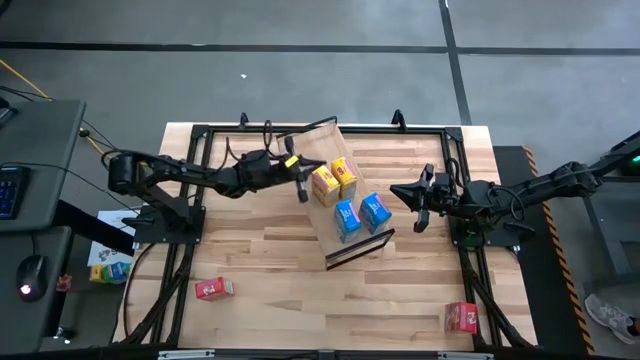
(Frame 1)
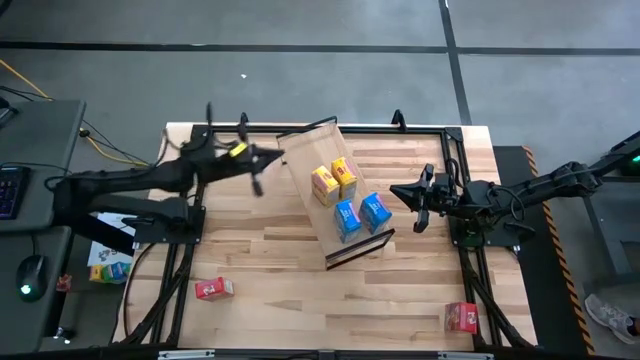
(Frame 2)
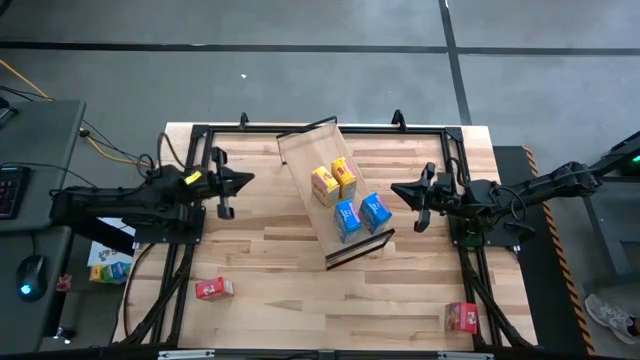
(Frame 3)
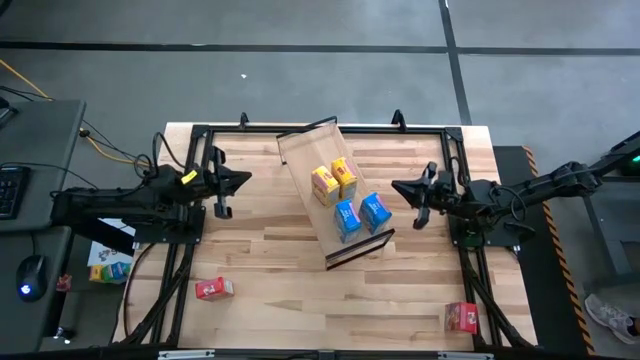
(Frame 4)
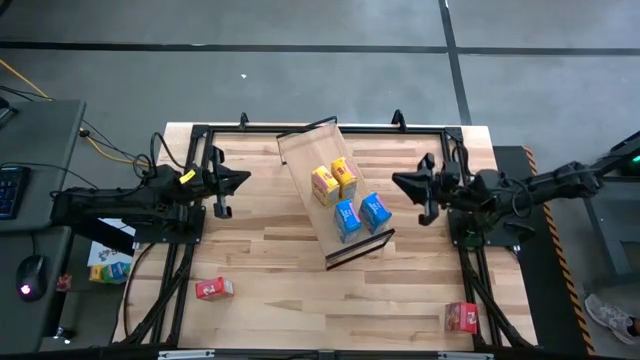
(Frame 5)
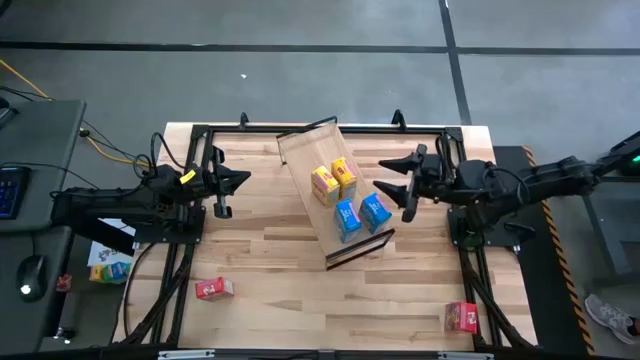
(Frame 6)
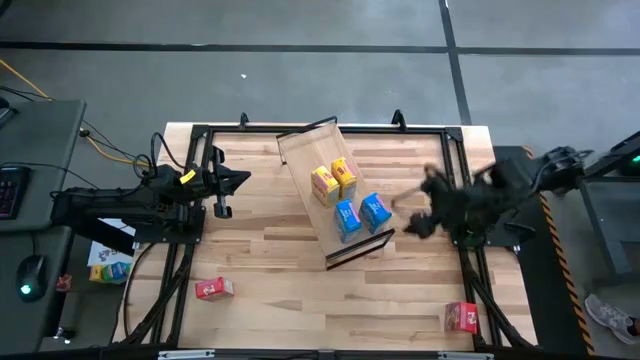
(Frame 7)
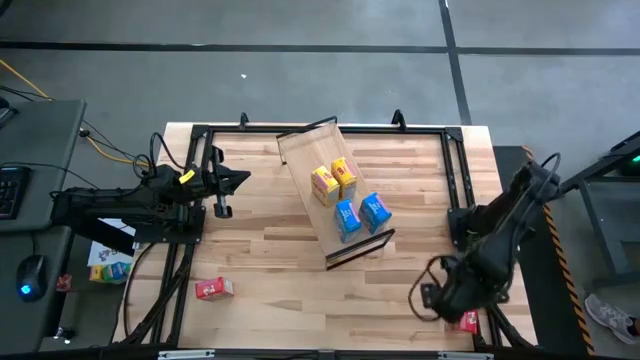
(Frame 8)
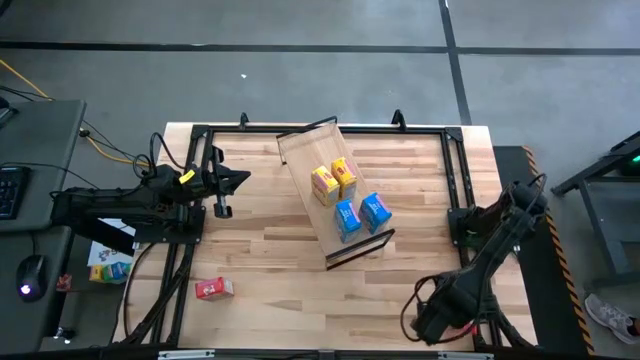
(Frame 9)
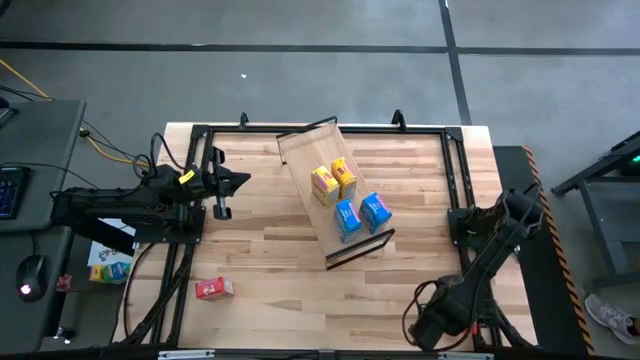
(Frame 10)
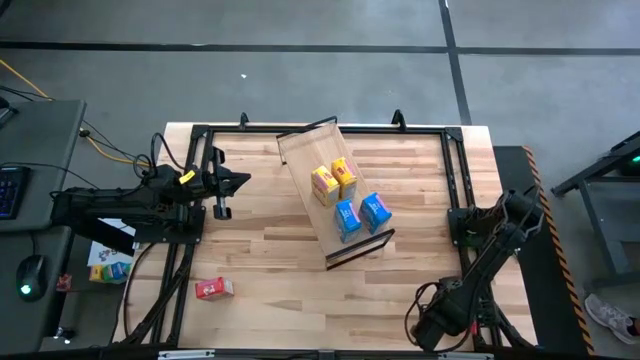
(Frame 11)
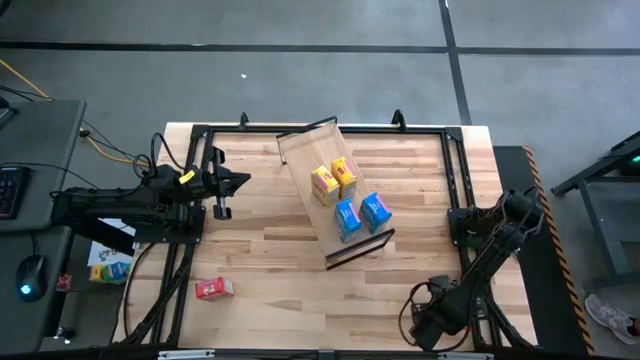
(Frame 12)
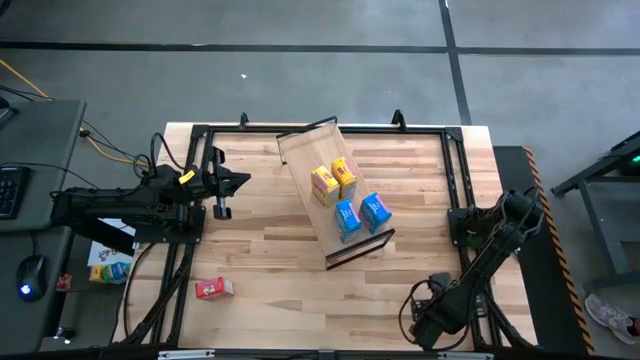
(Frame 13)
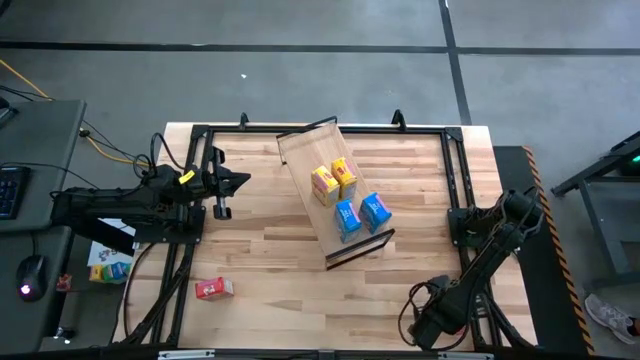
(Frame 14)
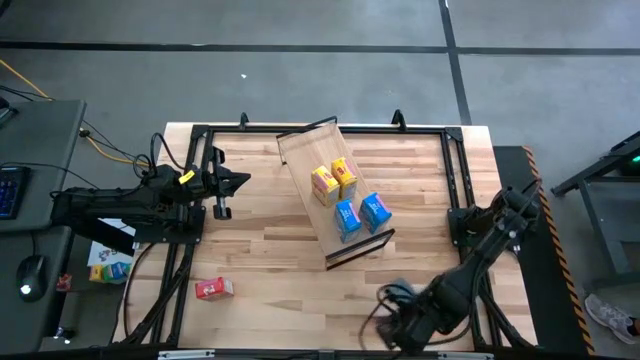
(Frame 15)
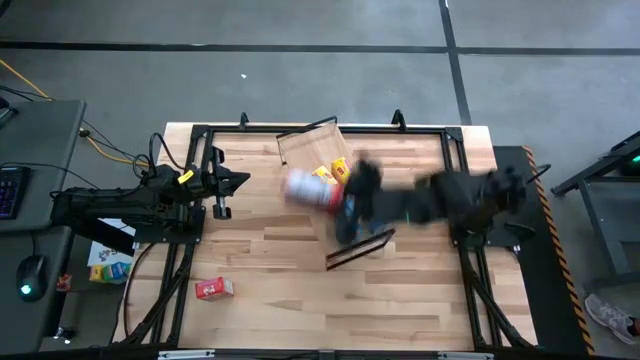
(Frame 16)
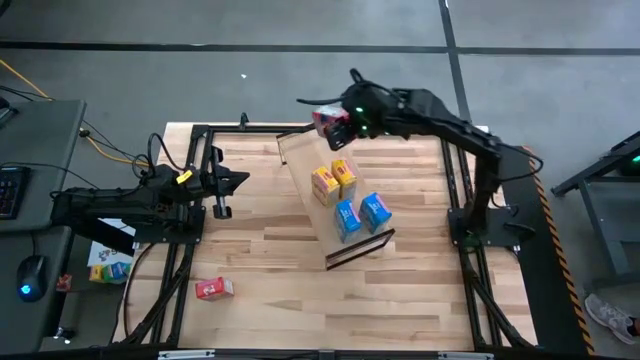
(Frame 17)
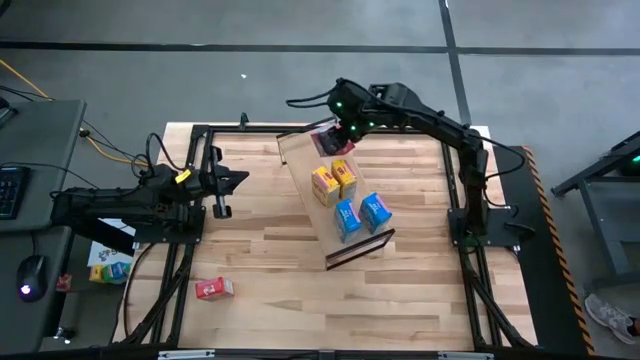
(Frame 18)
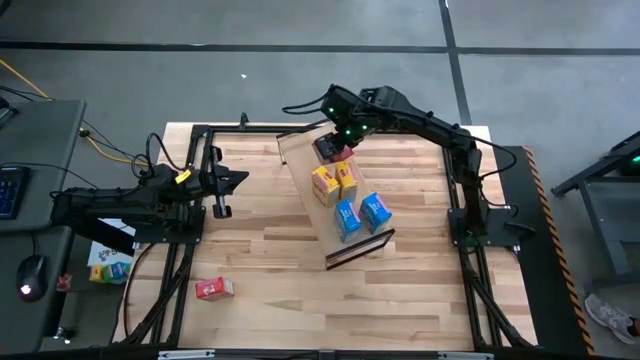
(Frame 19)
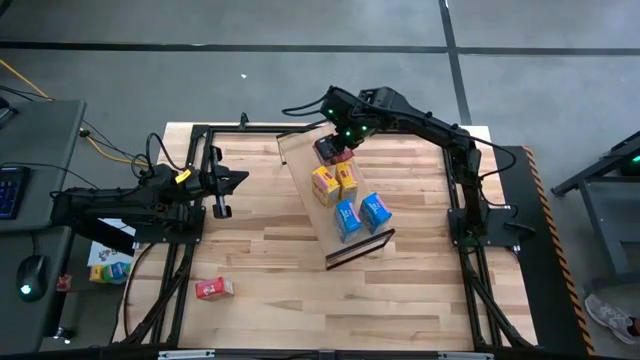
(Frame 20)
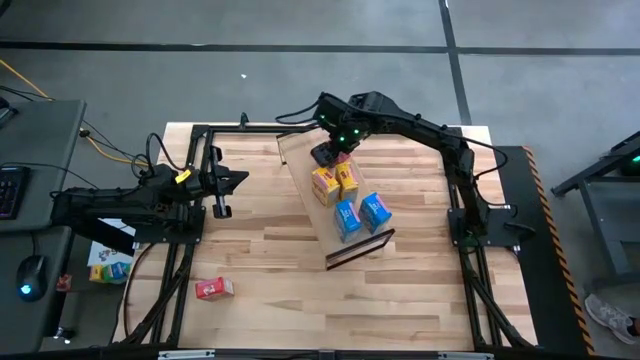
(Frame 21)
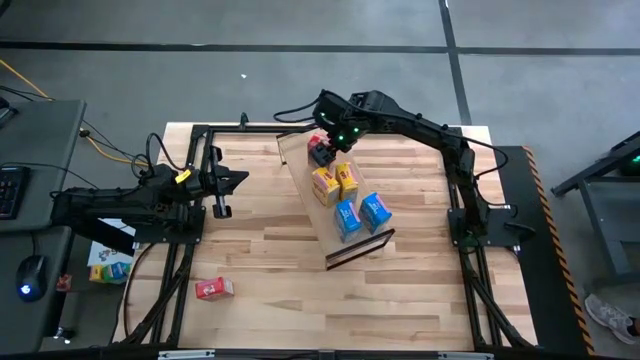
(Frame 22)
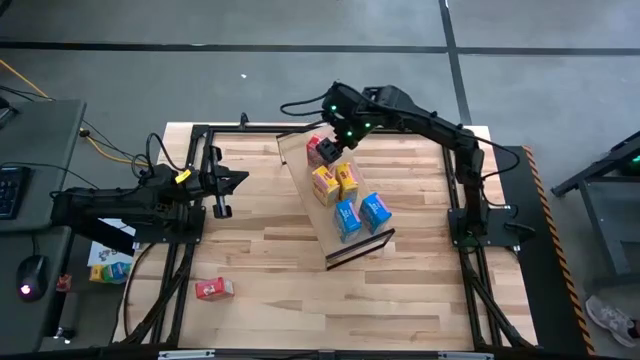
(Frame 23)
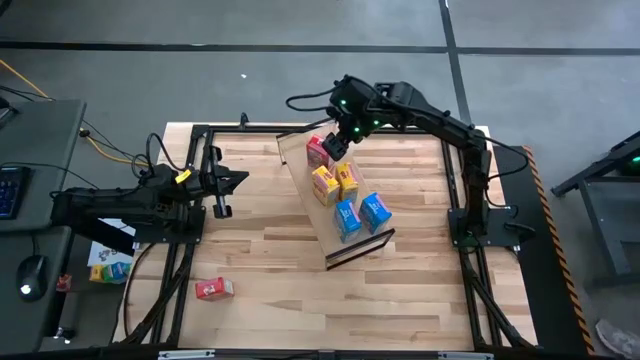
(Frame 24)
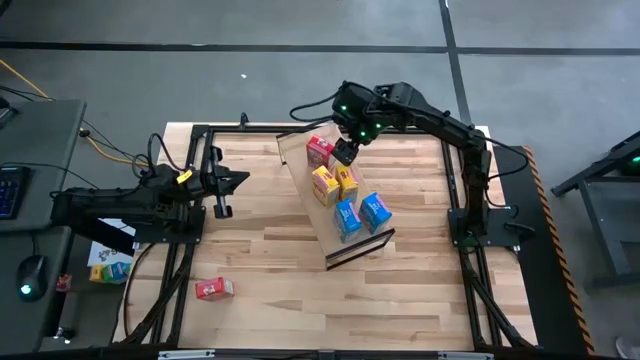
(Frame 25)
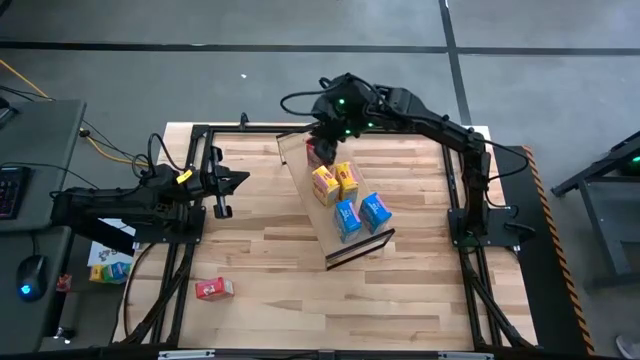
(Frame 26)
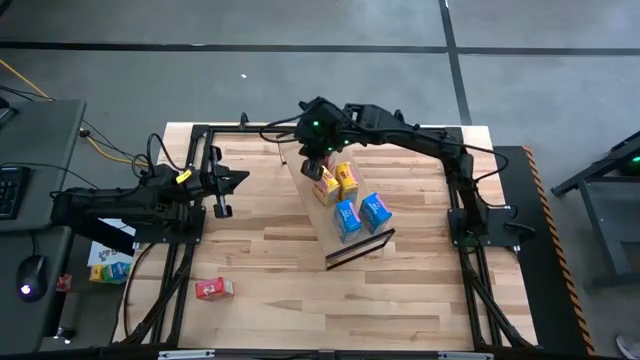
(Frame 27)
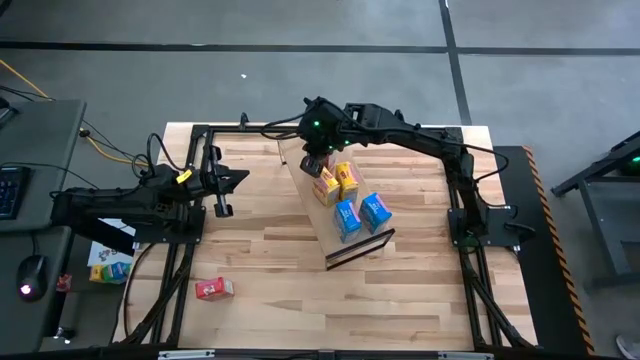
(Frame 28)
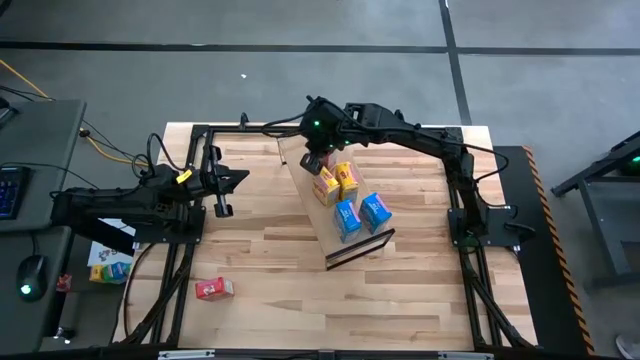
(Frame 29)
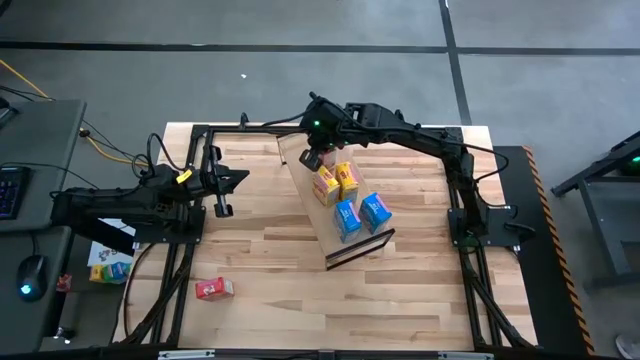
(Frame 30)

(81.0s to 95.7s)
Task: Stack cereal on shelf
Put the right red cereal box on the shelf

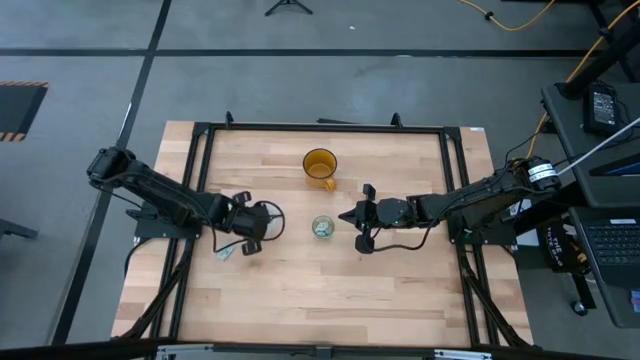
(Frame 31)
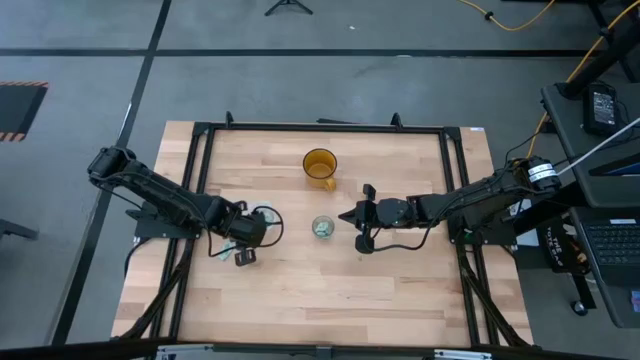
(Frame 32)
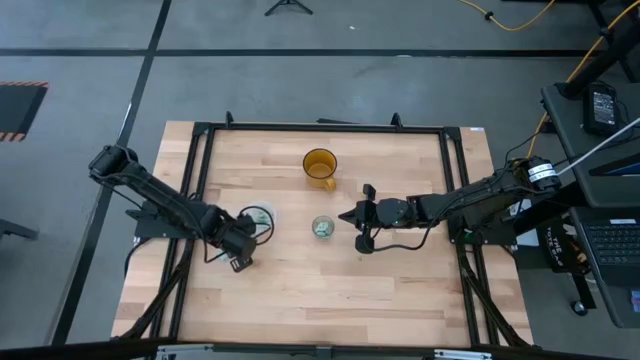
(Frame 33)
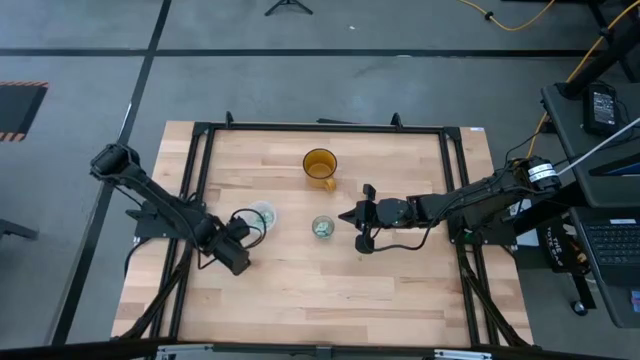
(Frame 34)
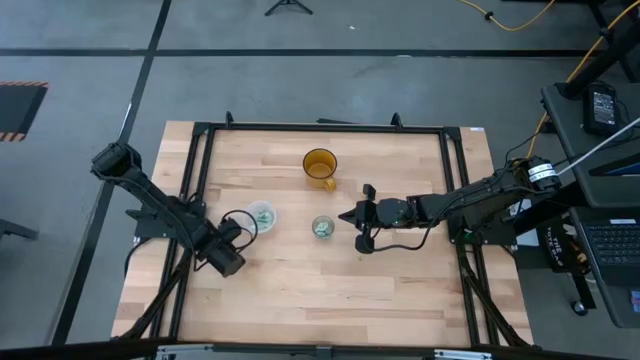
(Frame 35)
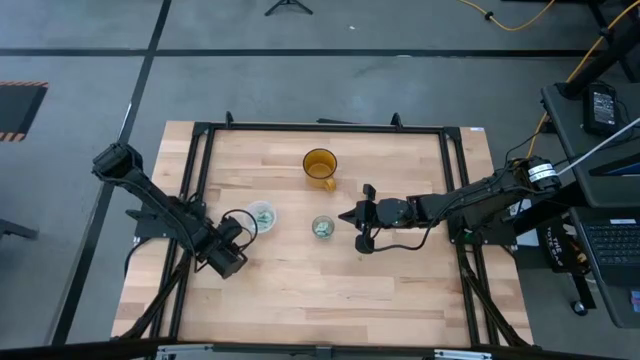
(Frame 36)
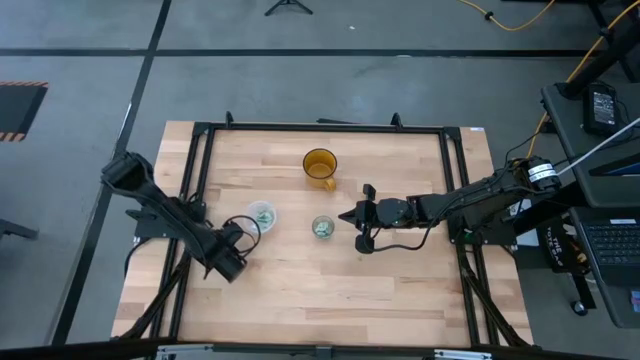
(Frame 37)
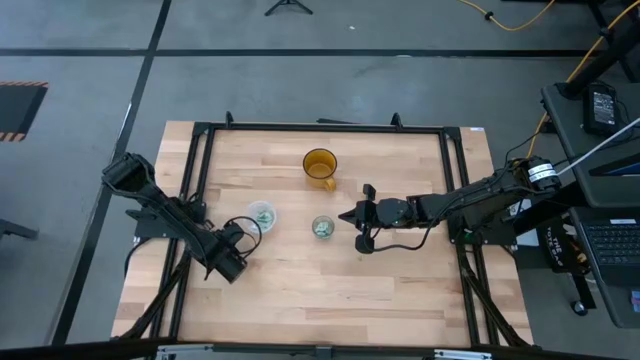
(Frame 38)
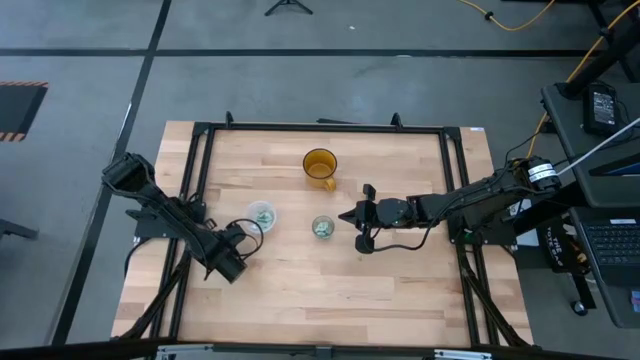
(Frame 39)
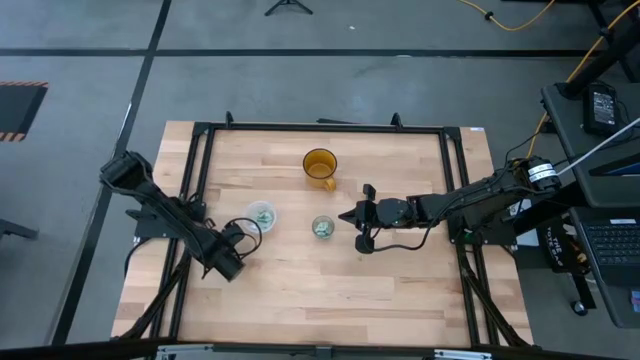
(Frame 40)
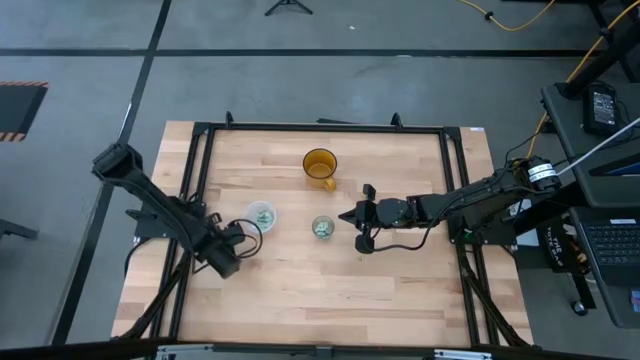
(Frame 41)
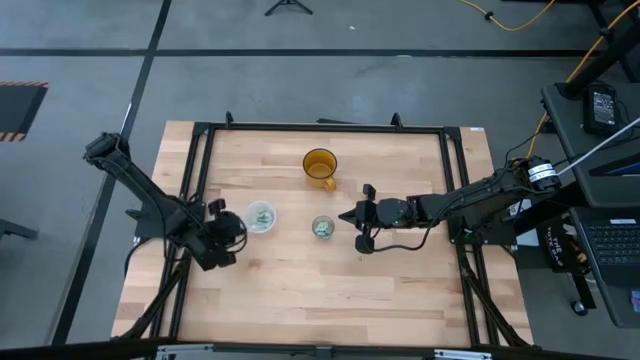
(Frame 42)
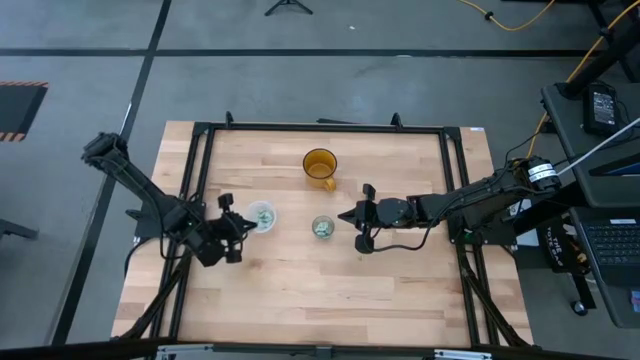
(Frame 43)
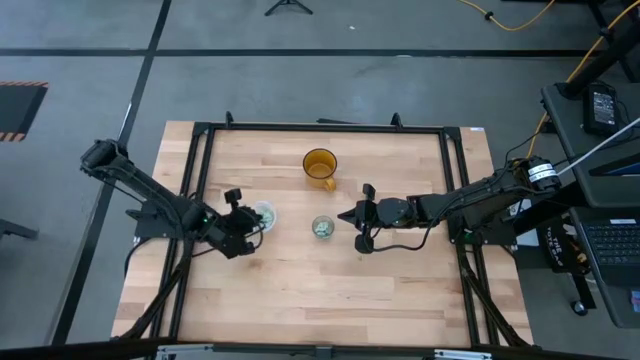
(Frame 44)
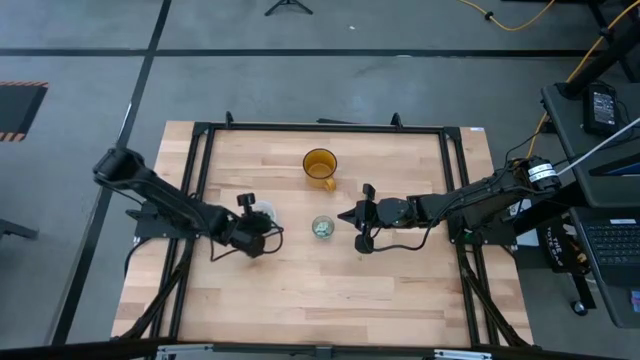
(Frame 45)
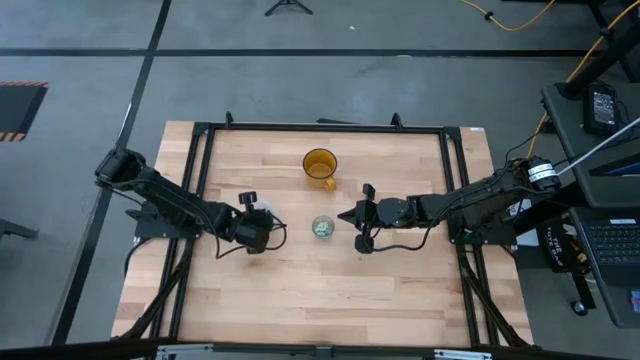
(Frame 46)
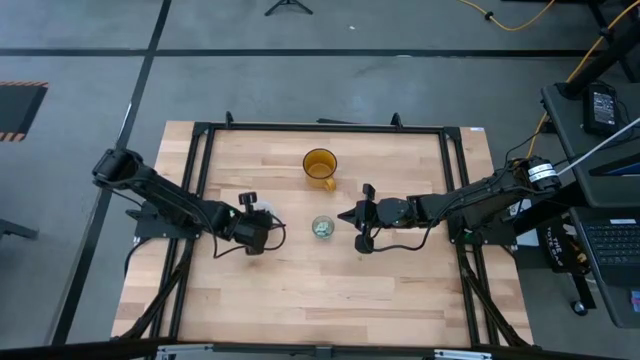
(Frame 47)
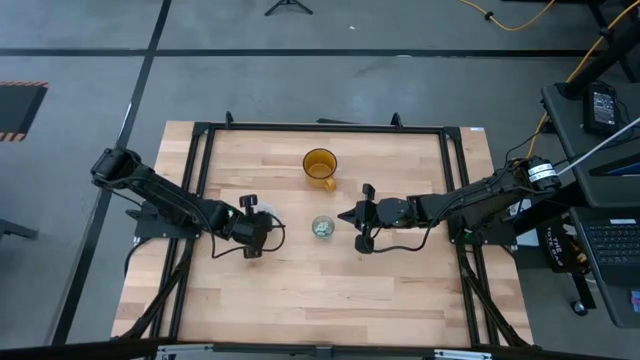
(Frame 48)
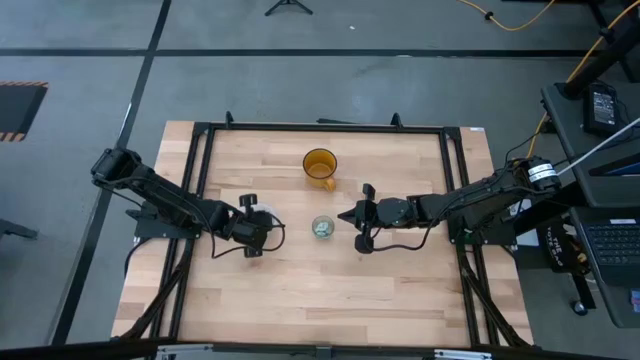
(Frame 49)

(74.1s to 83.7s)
Task: Pick and place Stevia / Truvia into bins
Put the stevia packet into the plastic tupperware
